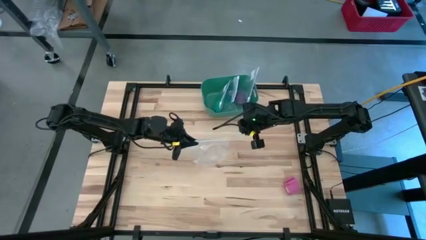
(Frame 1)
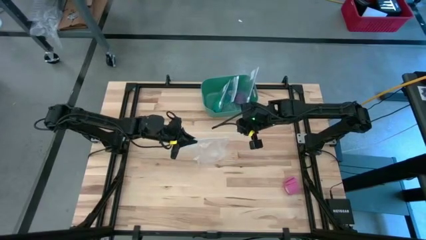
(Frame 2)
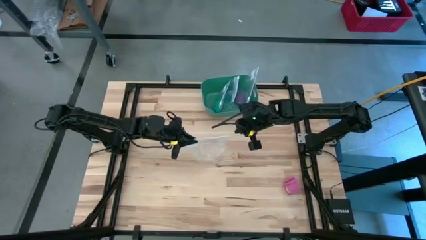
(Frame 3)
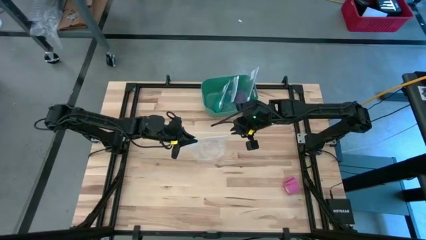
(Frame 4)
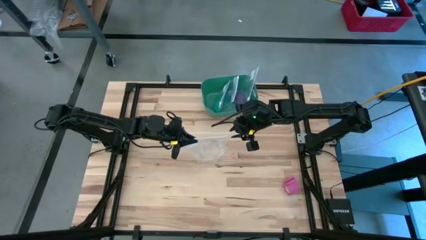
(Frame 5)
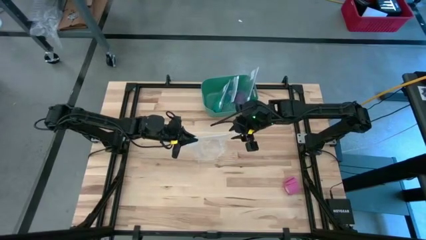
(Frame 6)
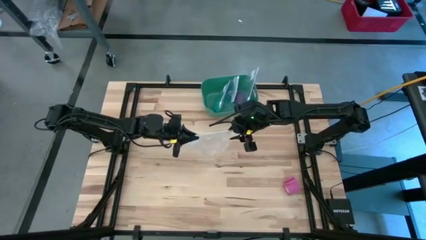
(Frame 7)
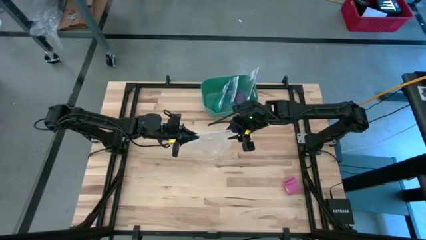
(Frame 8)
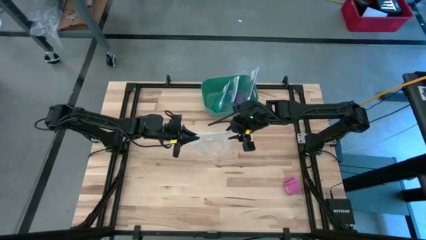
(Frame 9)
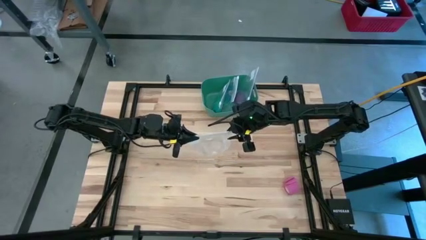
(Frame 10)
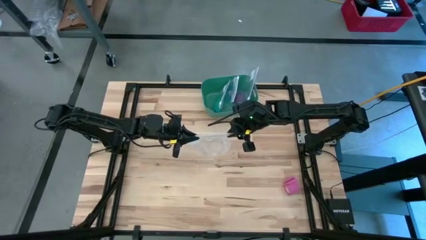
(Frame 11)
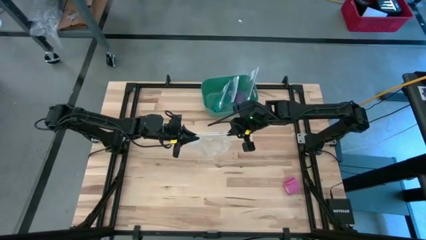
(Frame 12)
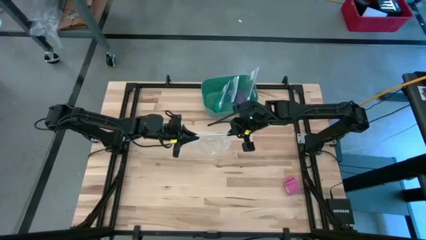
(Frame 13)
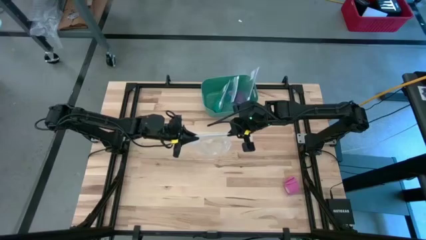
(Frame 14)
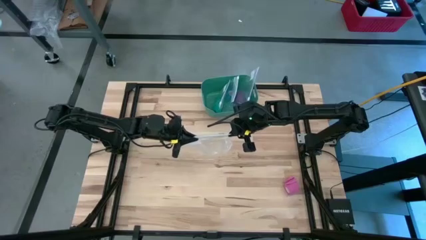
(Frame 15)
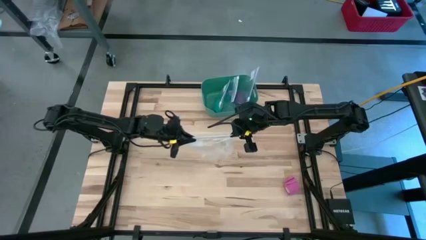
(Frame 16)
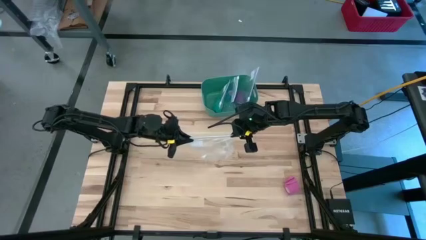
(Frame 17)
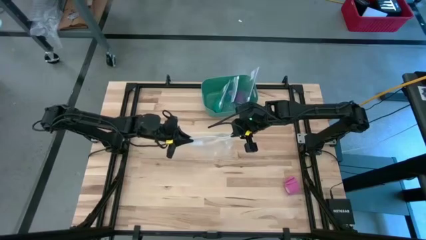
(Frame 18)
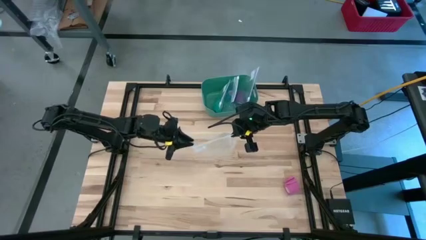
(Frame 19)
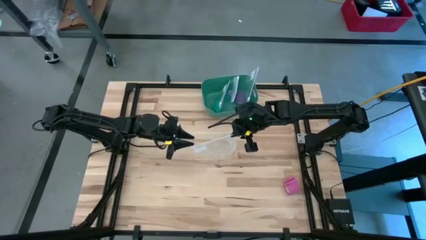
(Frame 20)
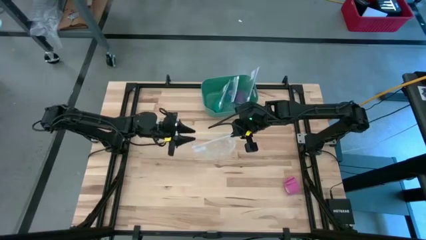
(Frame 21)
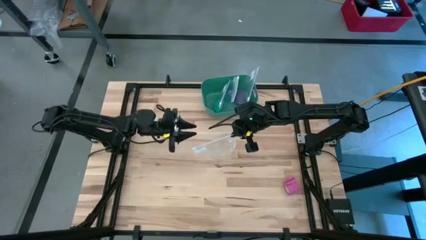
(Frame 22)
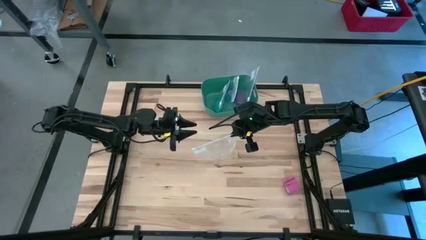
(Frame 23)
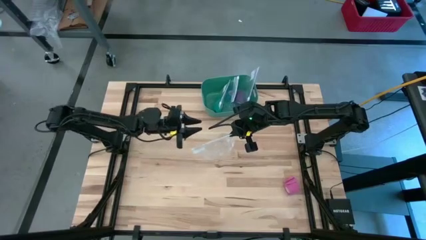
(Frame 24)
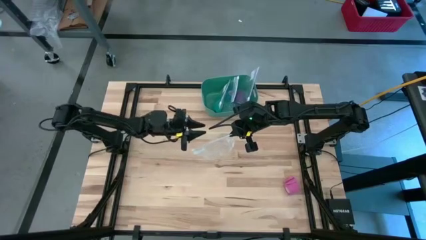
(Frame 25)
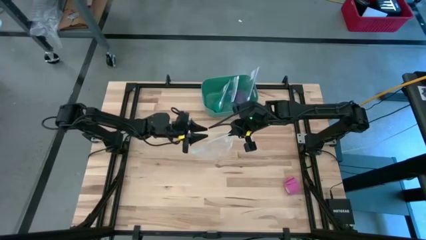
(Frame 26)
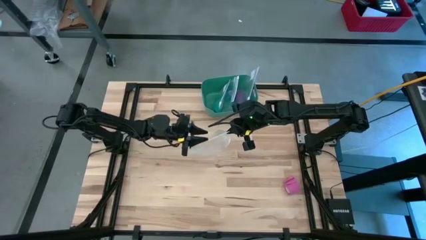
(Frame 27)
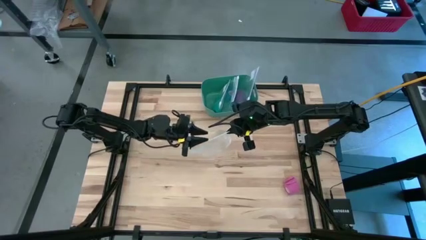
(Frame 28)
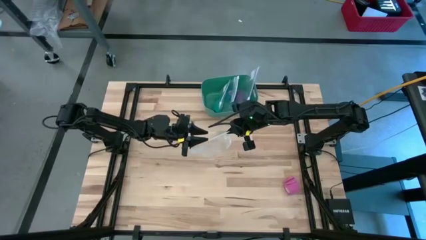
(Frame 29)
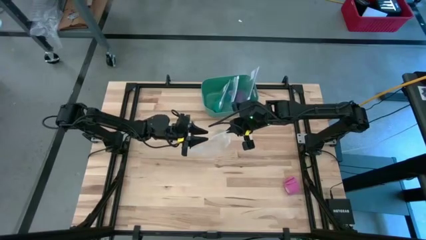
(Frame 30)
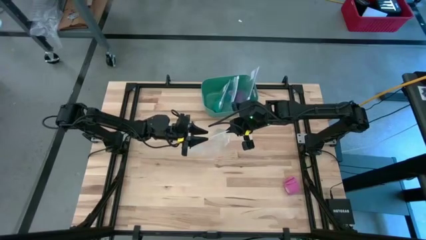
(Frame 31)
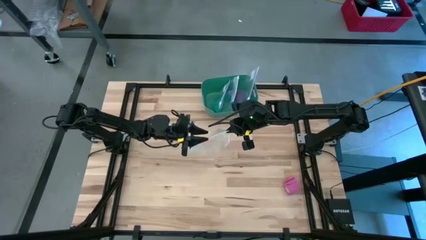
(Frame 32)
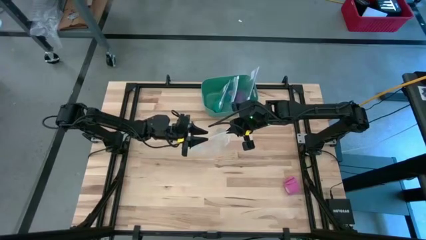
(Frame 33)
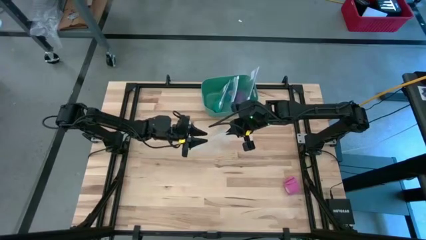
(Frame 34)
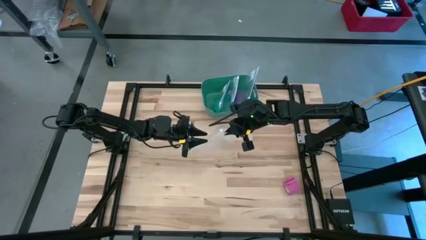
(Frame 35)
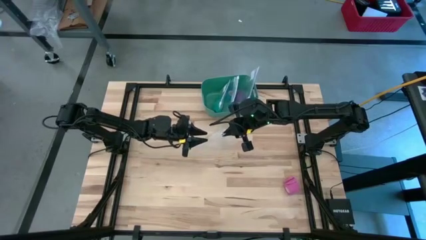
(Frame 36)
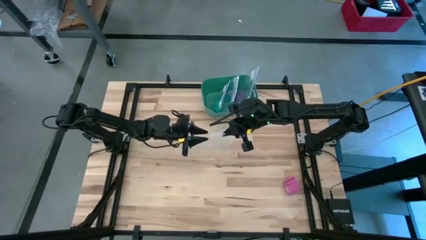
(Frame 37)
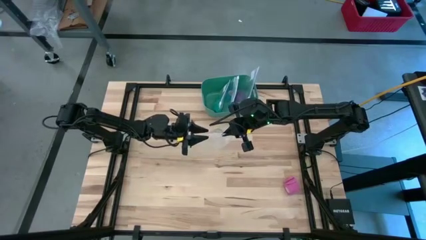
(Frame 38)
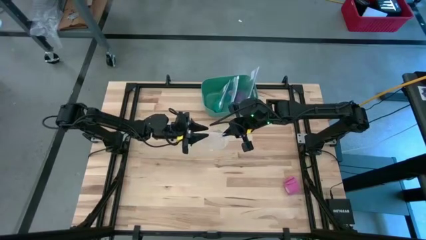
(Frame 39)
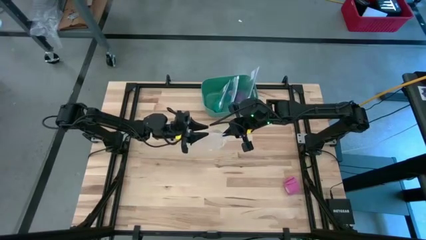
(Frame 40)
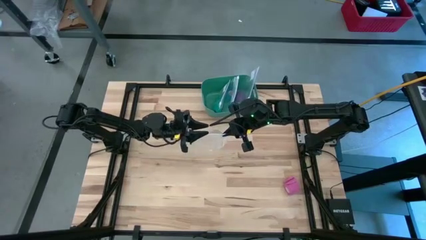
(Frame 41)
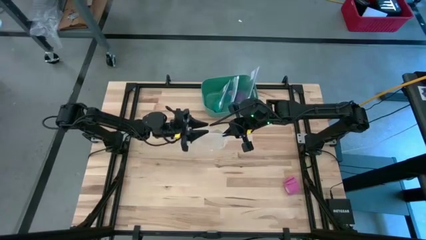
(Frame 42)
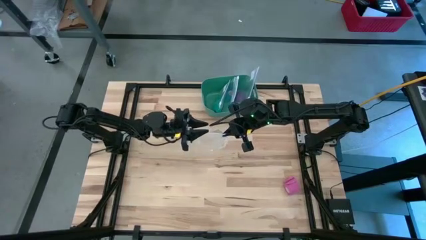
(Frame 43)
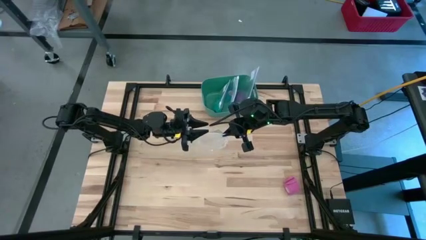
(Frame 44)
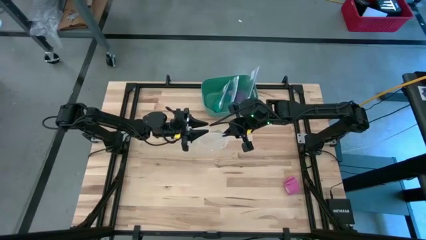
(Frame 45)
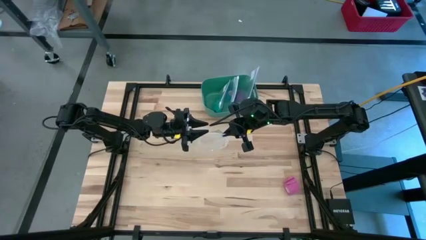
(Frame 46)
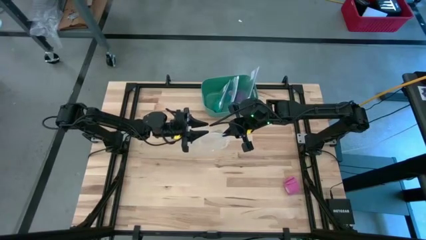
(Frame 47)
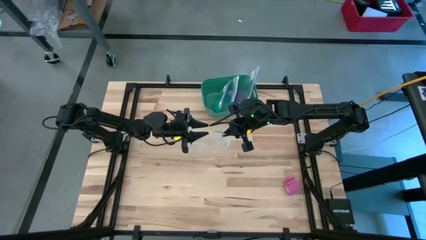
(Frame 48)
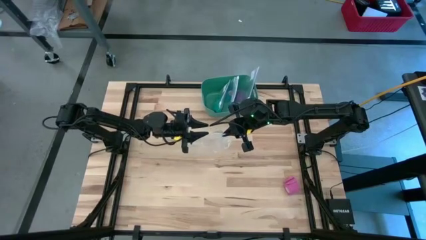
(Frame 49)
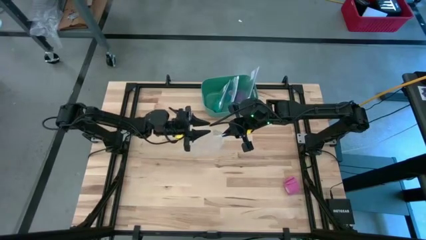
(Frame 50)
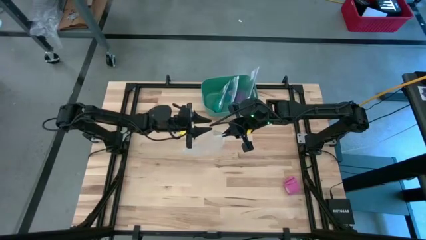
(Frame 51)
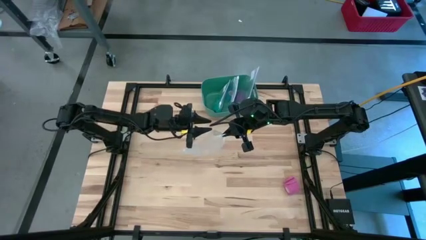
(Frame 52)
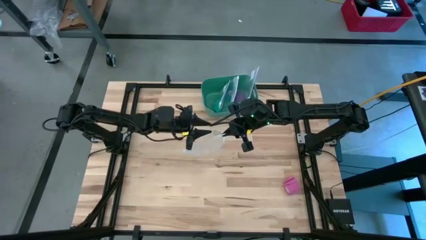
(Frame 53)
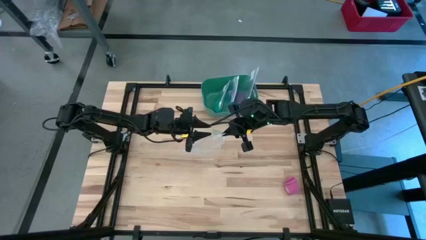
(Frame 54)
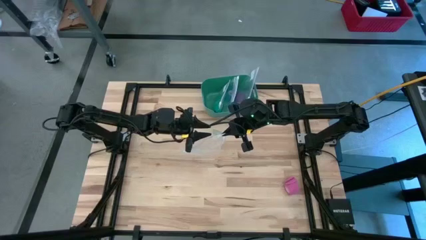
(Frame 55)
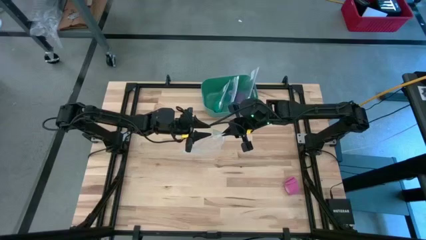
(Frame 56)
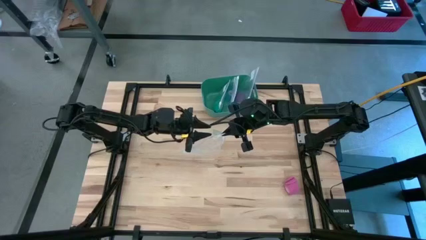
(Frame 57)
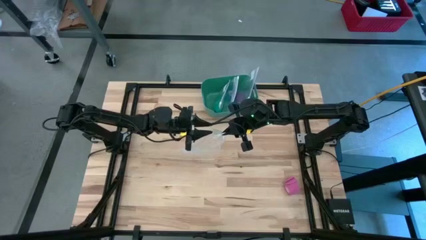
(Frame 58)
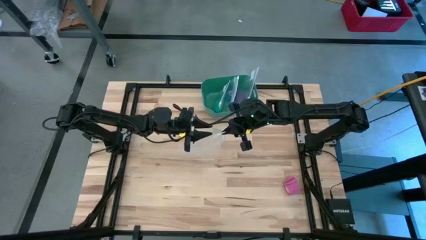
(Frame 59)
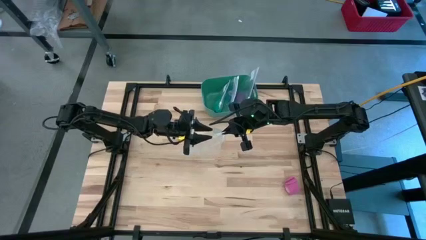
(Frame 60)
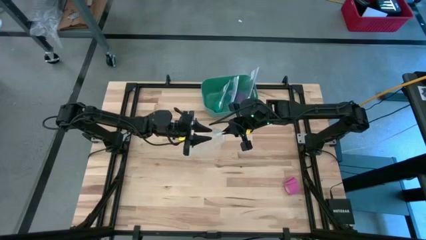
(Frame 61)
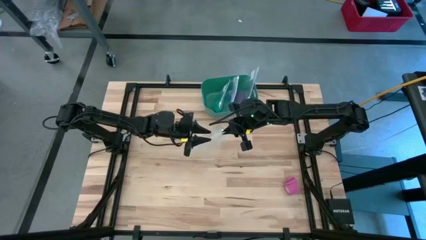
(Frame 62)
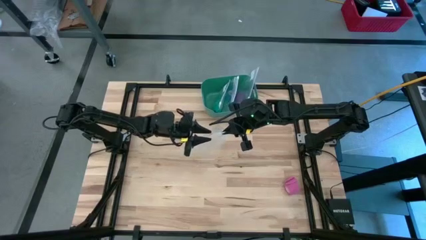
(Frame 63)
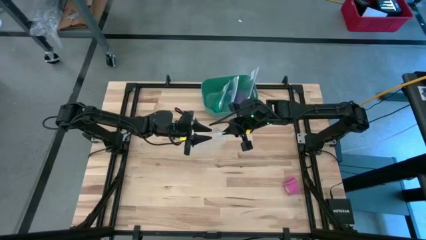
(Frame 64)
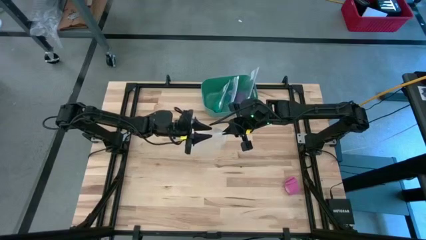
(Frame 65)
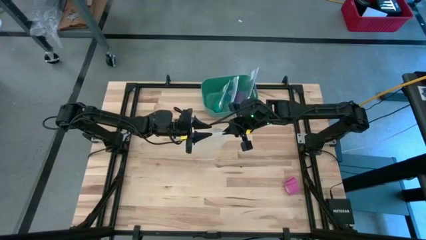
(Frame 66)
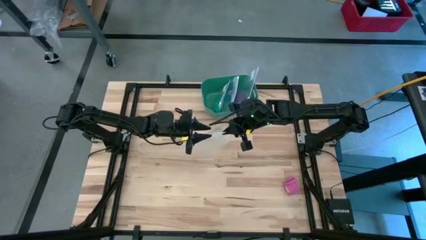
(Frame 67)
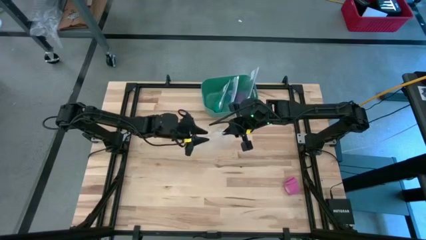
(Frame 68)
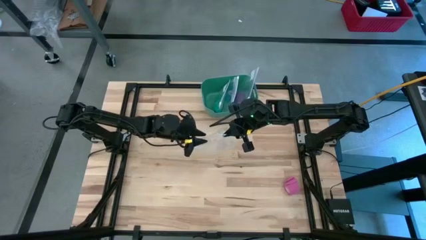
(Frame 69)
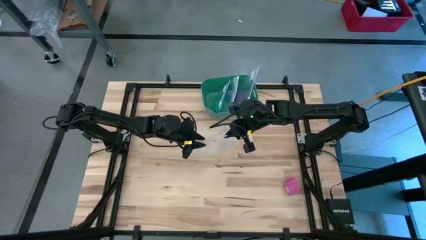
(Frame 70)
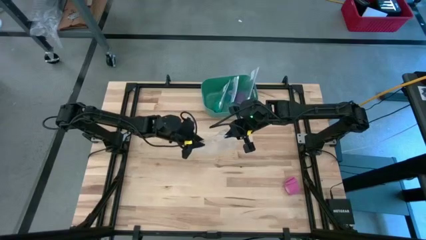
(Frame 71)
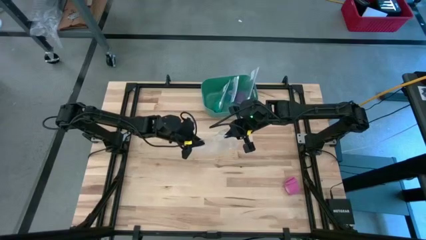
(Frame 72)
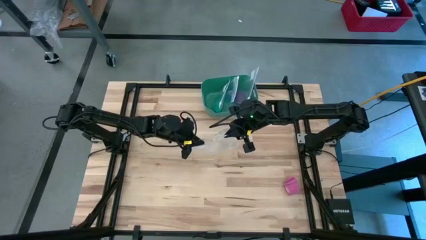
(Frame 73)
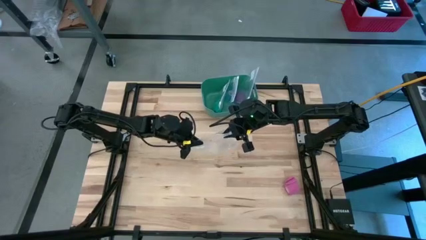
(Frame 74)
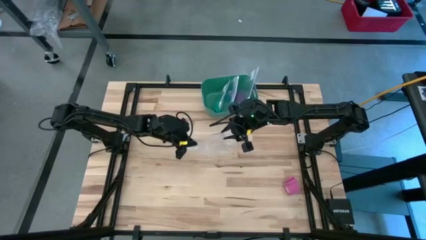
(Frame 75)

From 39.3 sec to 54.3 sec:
Task: Roll bandage
Open the transparent zip bag
